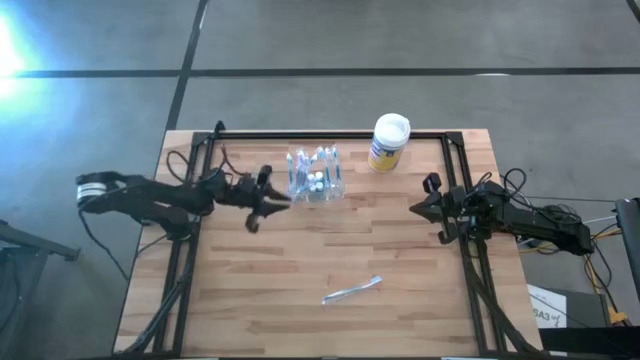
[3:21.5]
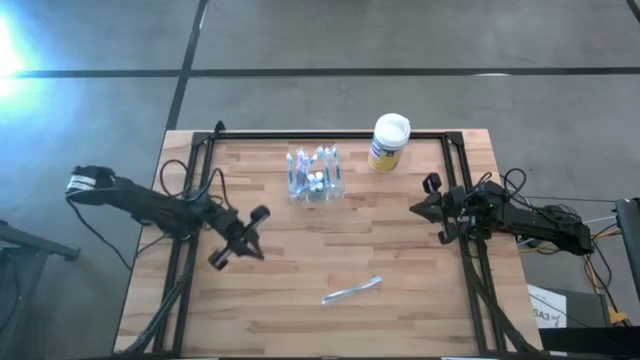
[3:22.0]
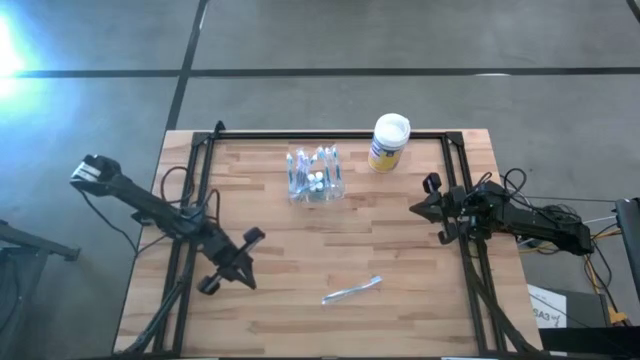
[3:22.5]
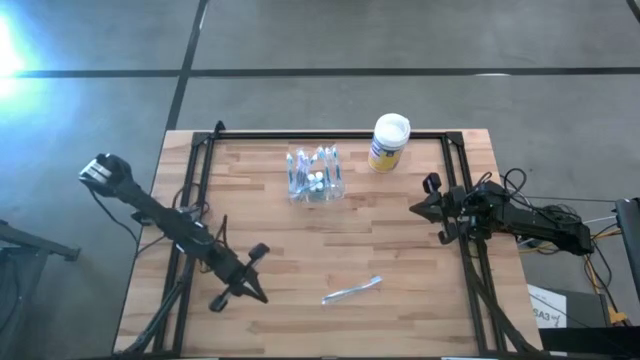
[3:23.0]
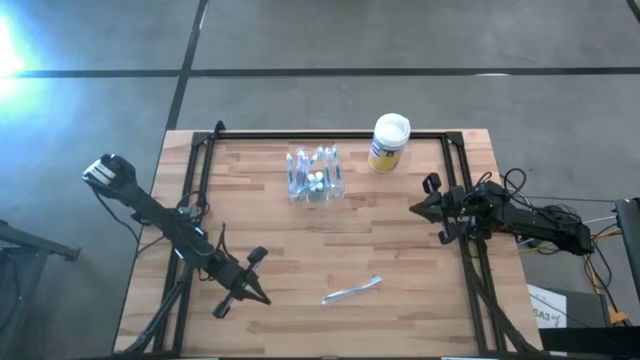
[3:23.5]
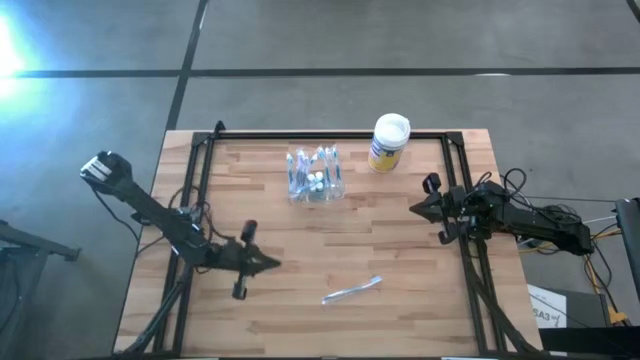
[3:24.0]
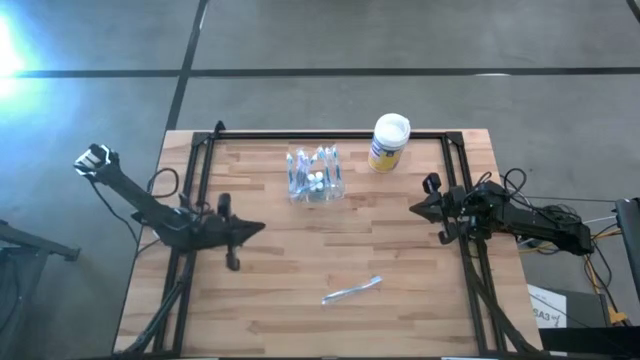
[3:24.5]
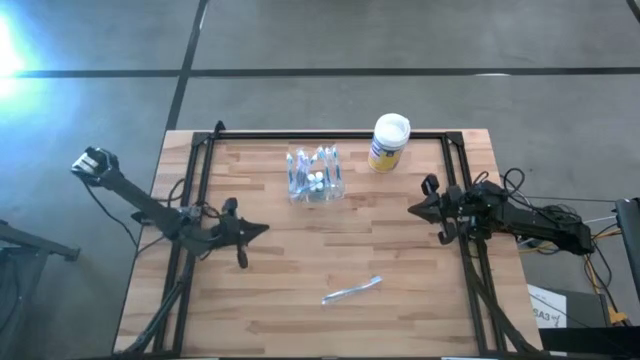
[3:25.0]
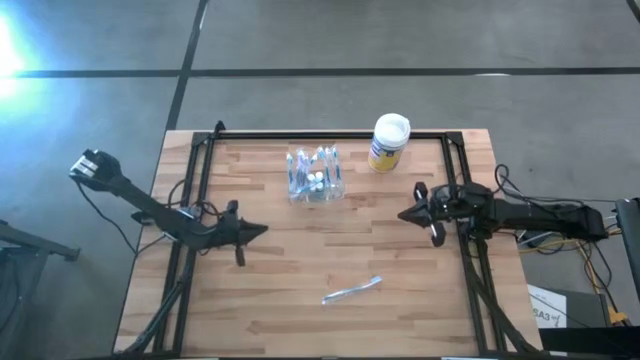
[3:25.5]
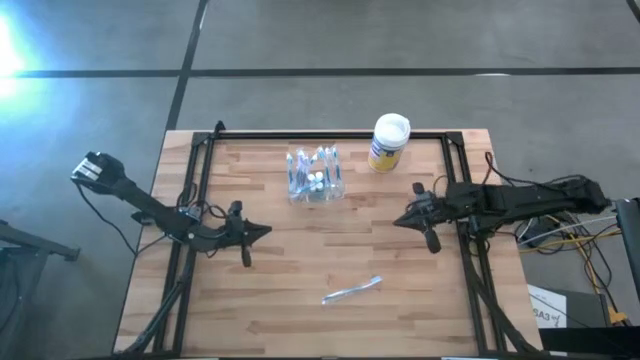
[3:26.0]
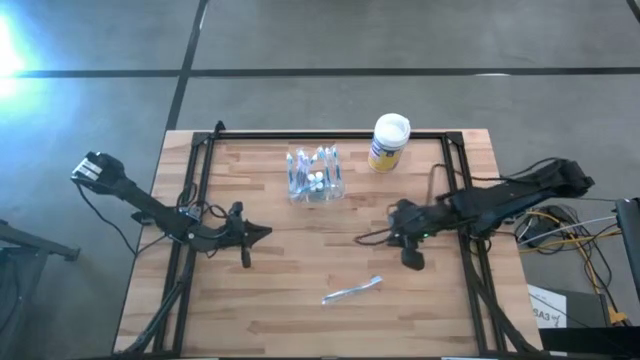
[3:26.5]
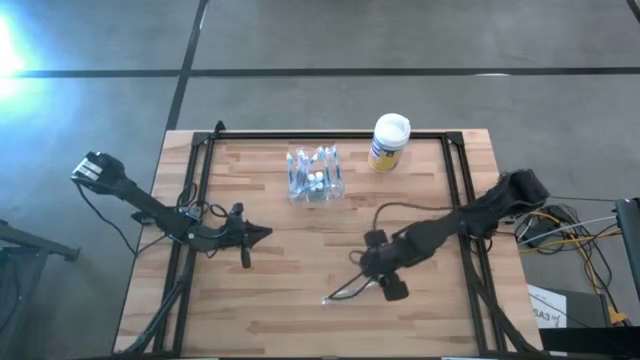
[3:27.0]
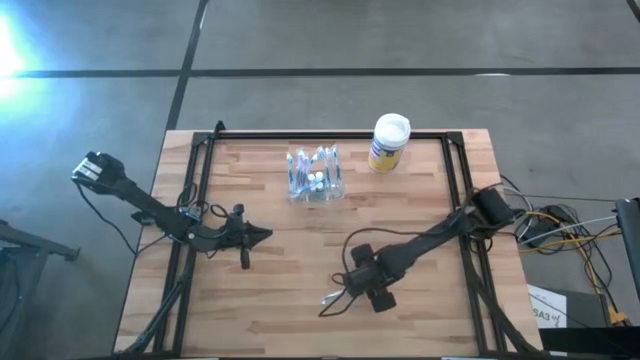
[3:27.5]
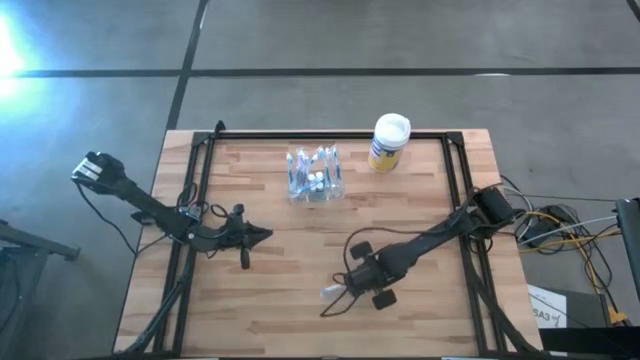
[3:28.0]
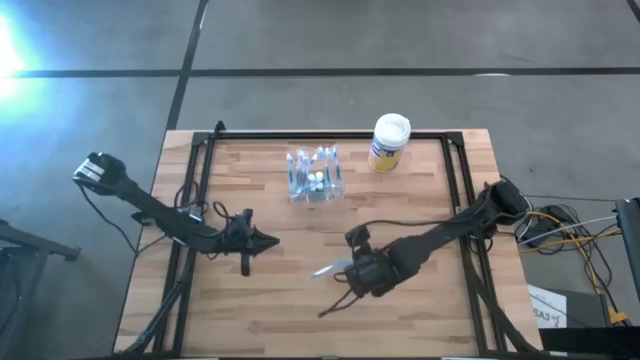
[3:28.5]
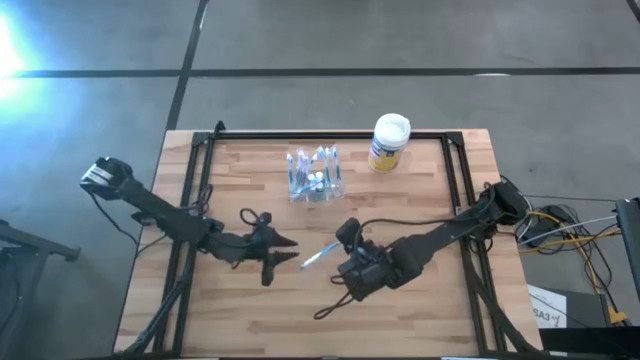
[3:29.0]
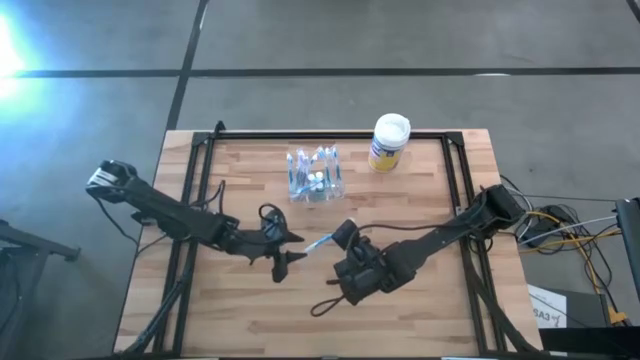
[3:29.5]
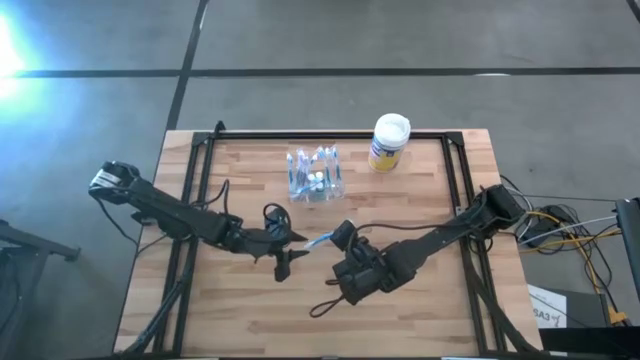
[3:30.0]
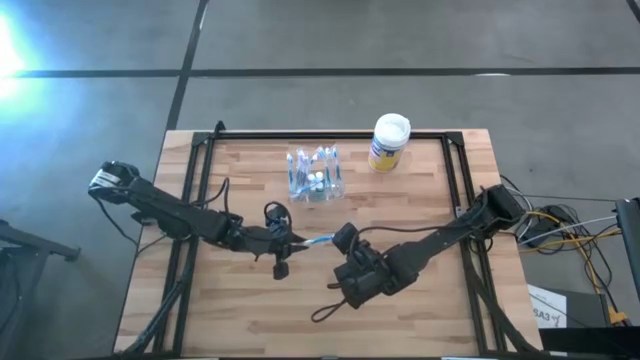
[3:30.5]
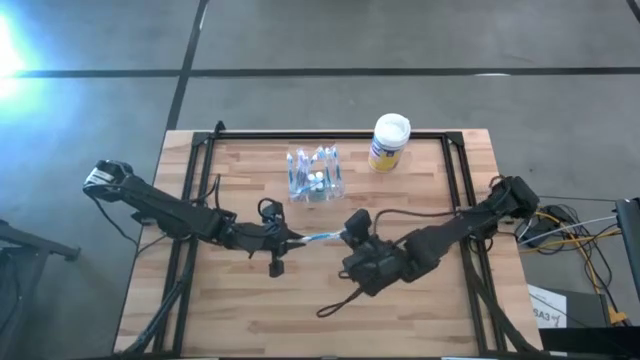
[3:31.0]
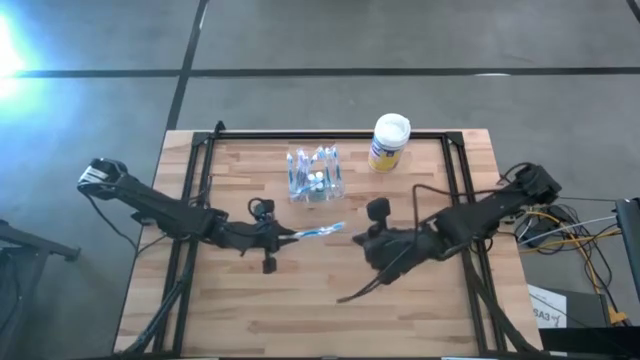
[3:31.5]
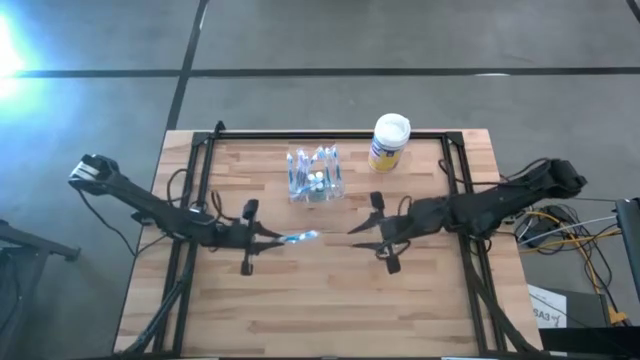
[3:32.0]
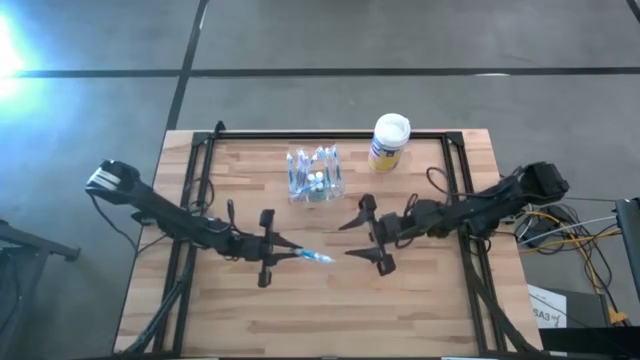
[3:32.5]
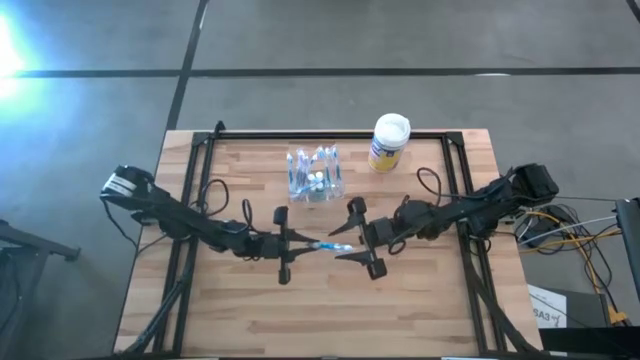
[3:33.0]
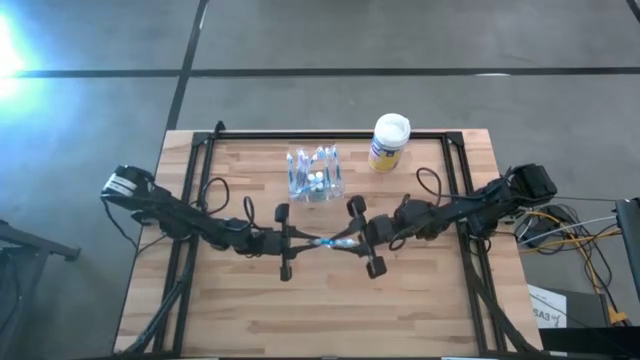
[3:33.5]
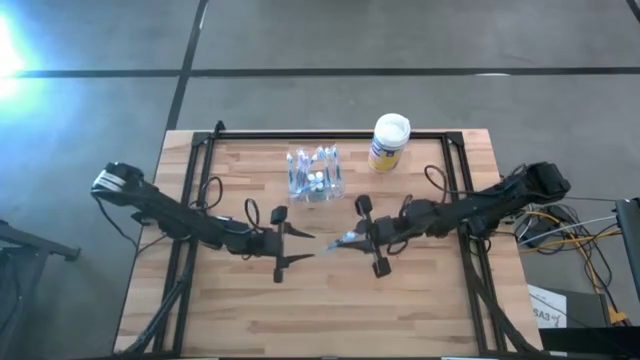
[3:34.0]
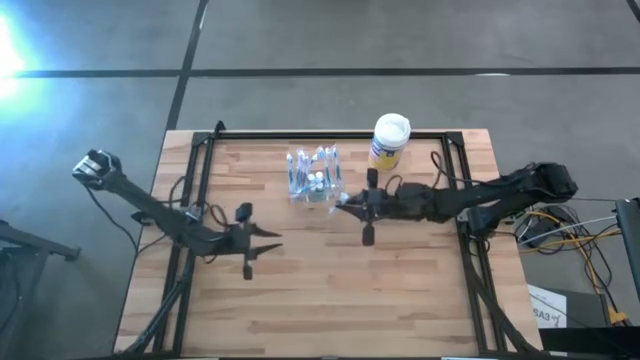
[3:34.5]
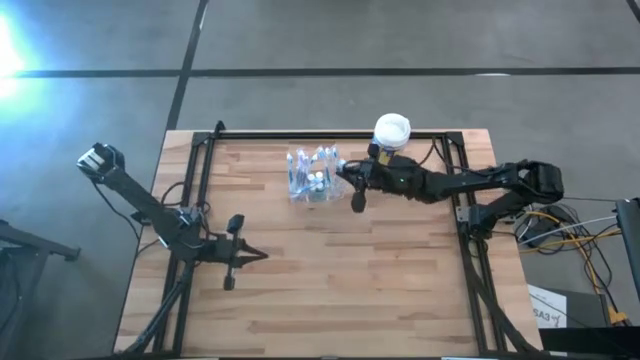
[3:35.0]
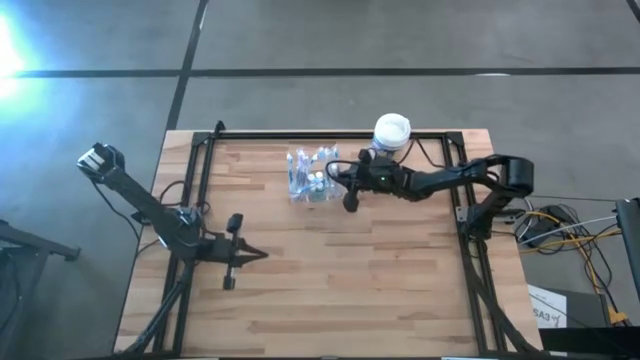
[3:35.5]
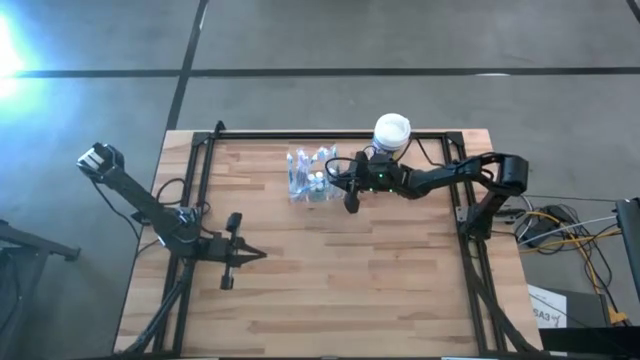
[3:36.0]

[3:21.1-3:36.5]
Task: Pick & Place toothbrushing station
Put the blue toothbrush into the transparent organizer

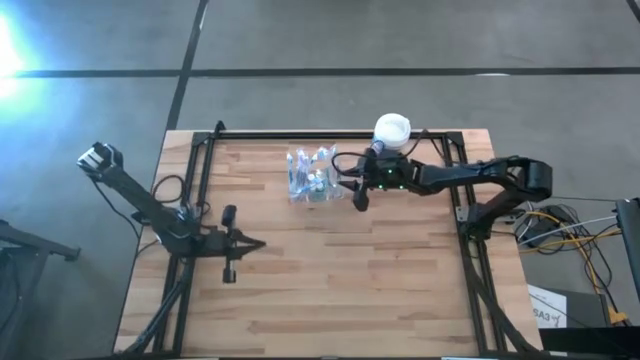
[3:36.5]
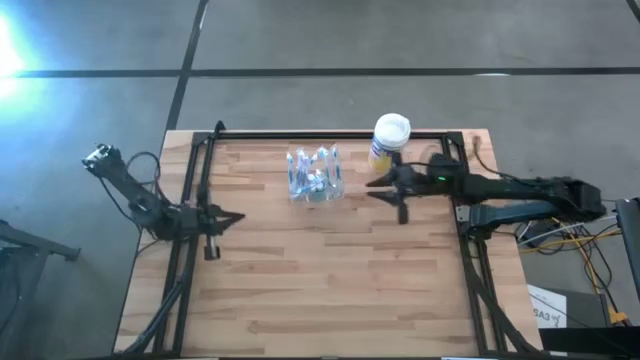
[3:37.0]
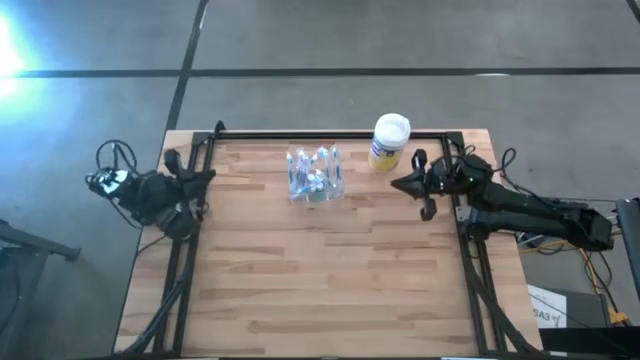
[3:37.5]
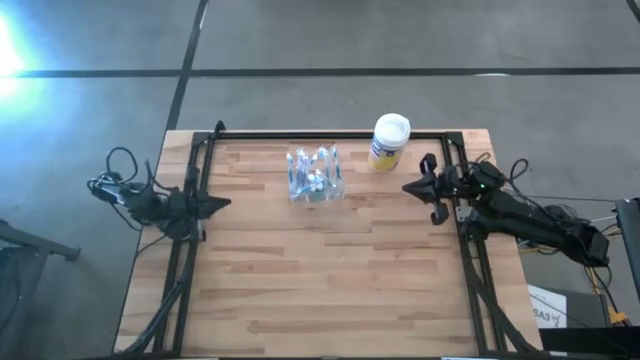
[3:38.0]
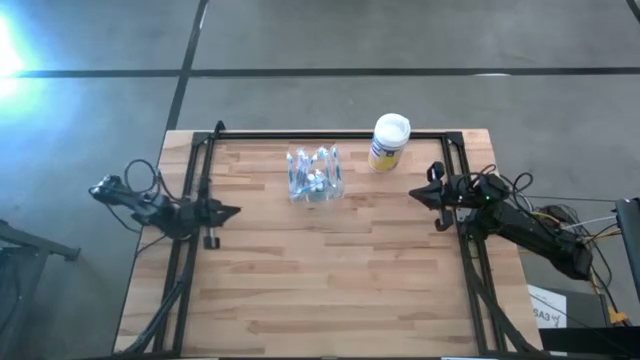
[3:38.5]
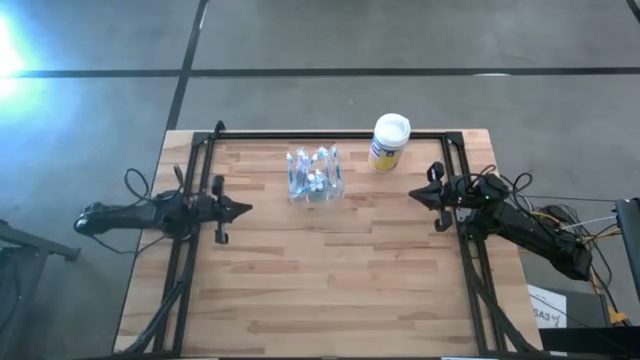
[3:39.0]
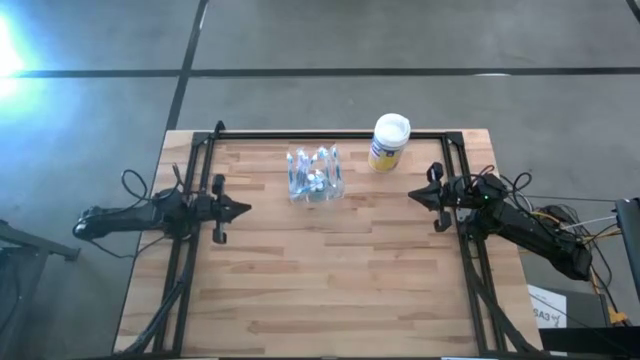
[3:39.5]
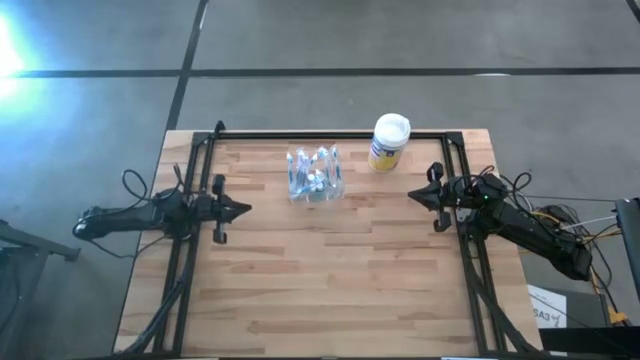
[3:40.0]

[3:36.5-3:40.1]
Return to Home Position
